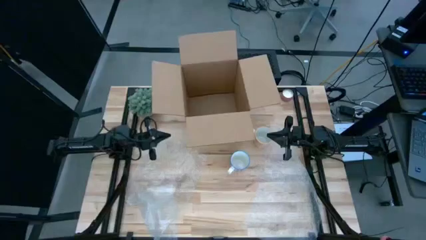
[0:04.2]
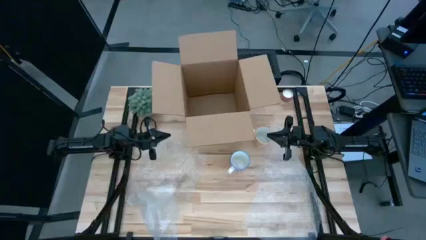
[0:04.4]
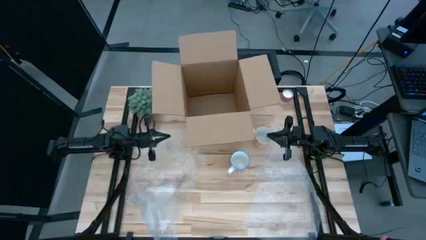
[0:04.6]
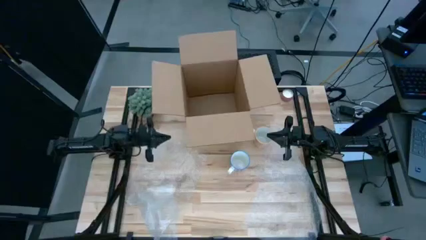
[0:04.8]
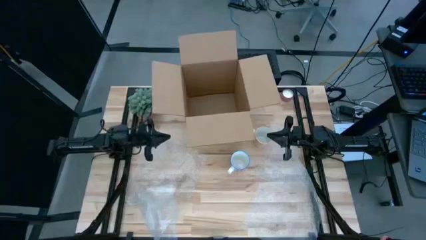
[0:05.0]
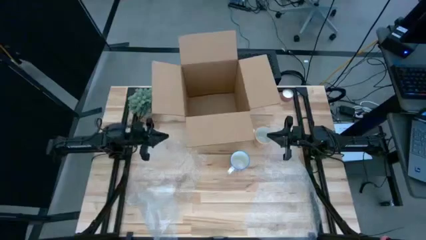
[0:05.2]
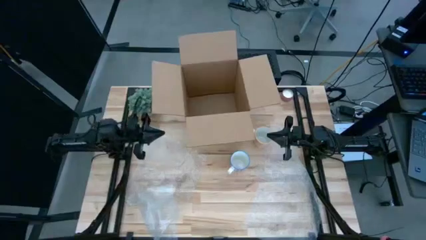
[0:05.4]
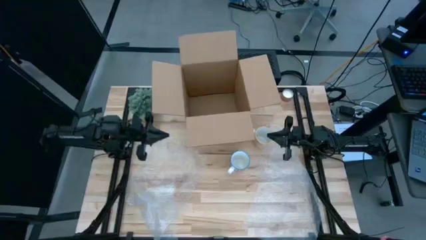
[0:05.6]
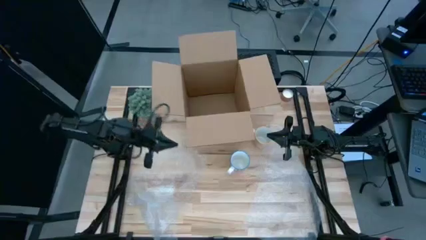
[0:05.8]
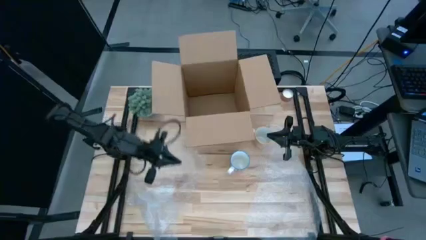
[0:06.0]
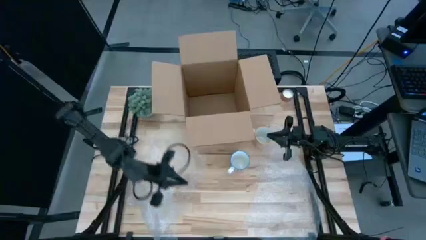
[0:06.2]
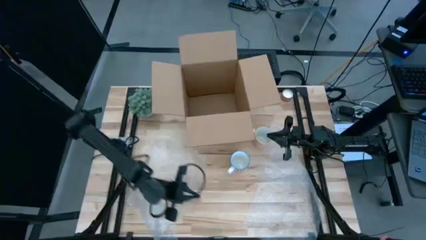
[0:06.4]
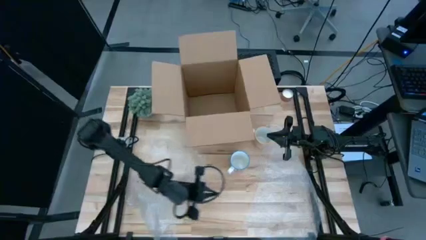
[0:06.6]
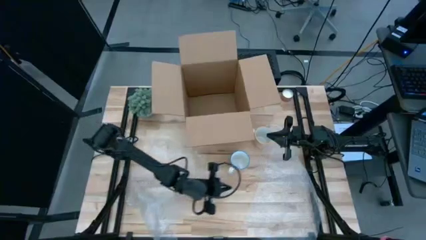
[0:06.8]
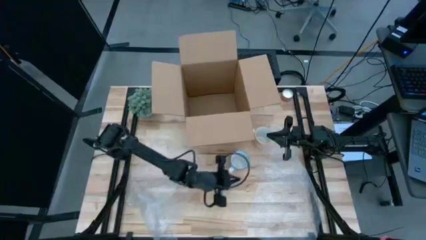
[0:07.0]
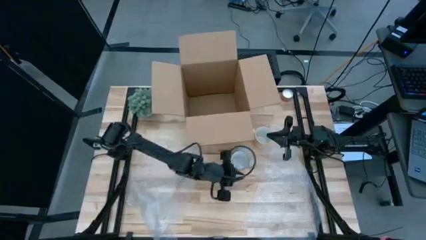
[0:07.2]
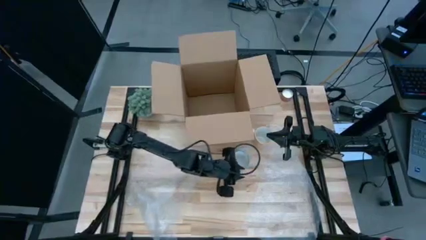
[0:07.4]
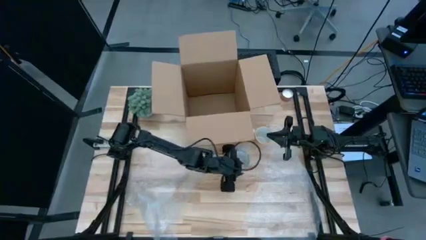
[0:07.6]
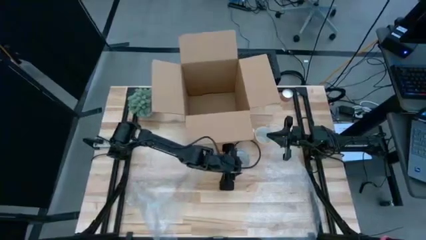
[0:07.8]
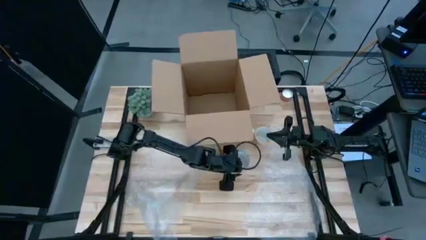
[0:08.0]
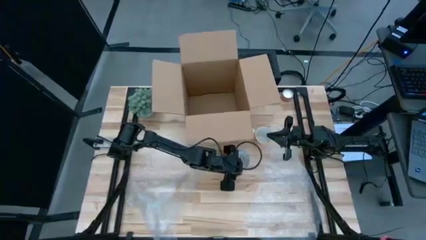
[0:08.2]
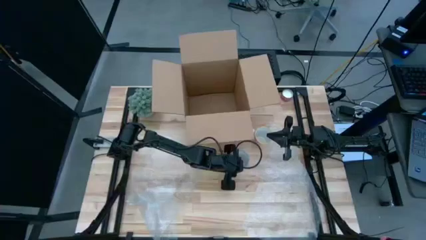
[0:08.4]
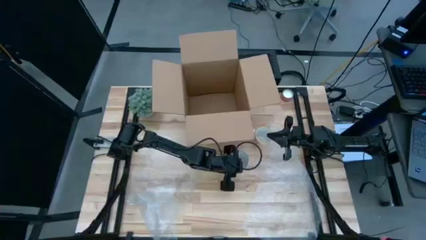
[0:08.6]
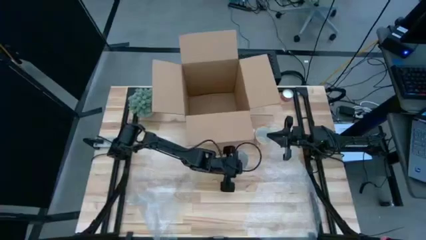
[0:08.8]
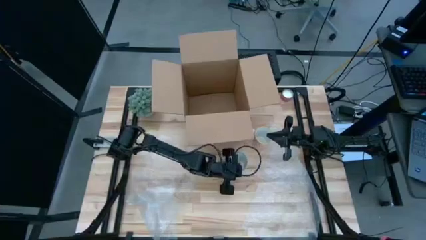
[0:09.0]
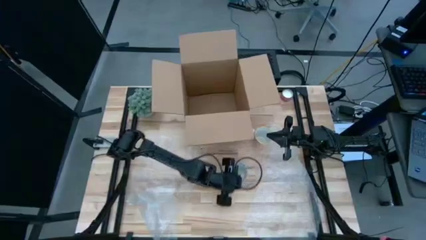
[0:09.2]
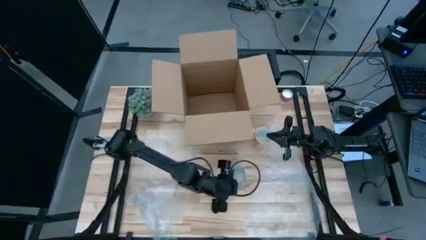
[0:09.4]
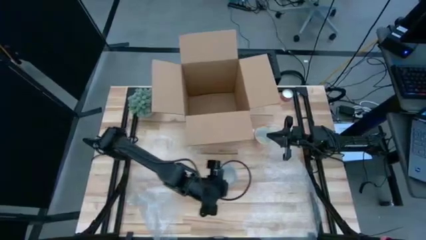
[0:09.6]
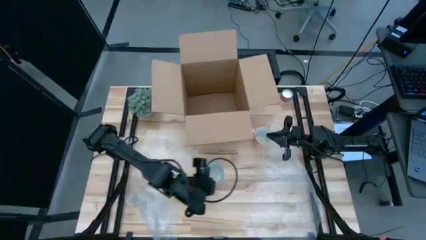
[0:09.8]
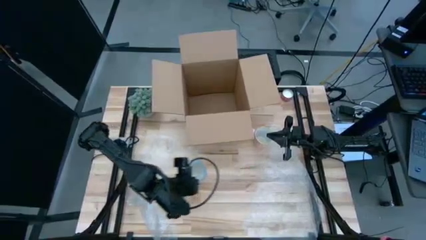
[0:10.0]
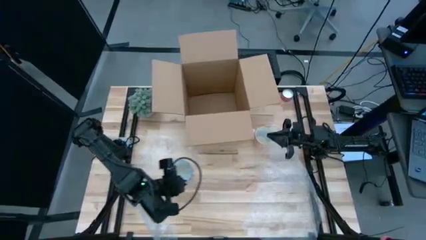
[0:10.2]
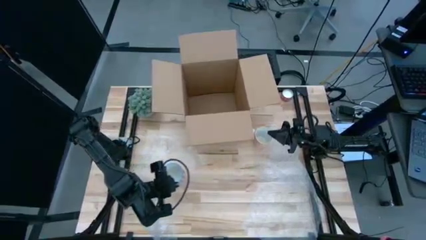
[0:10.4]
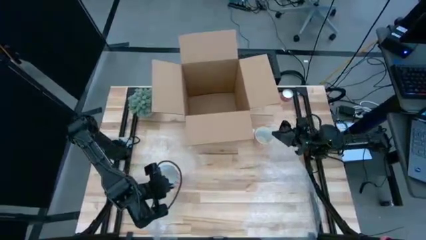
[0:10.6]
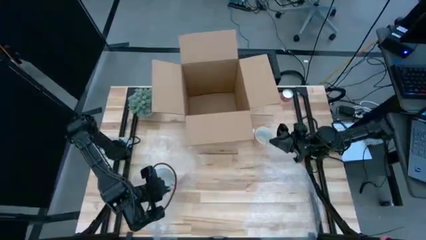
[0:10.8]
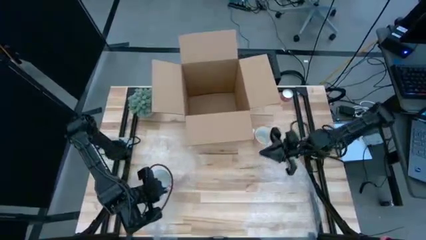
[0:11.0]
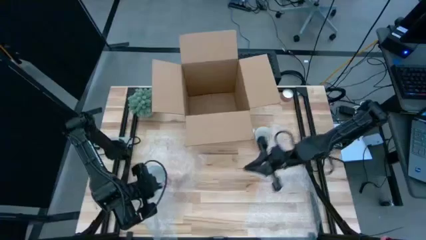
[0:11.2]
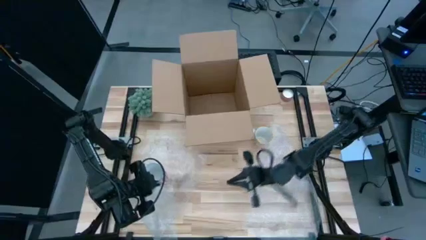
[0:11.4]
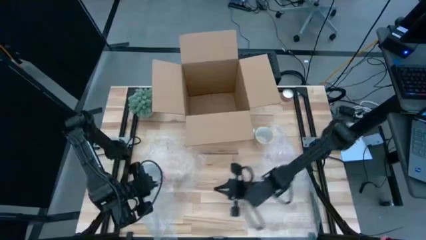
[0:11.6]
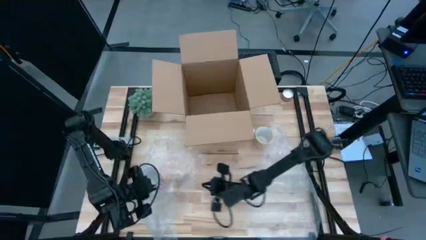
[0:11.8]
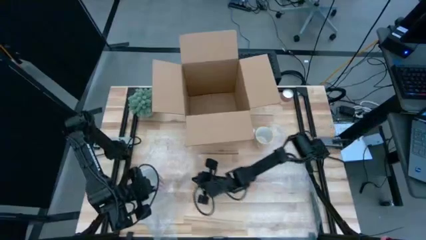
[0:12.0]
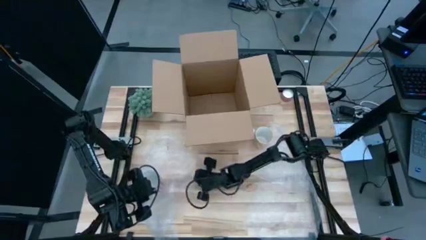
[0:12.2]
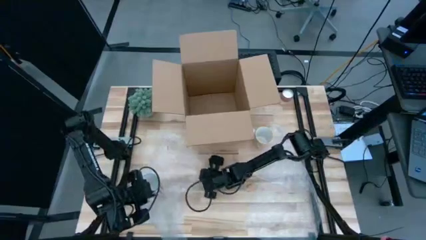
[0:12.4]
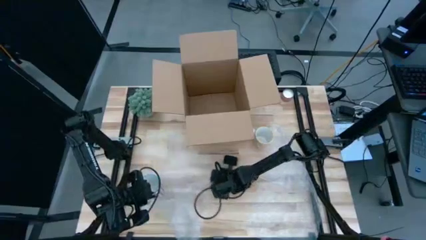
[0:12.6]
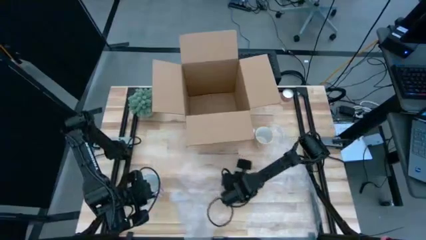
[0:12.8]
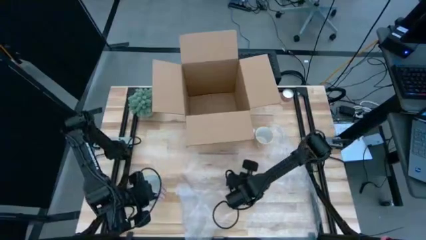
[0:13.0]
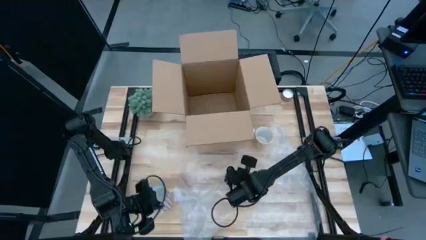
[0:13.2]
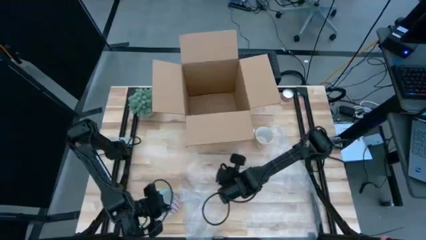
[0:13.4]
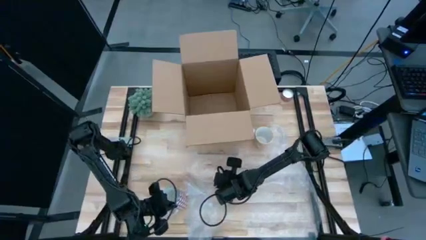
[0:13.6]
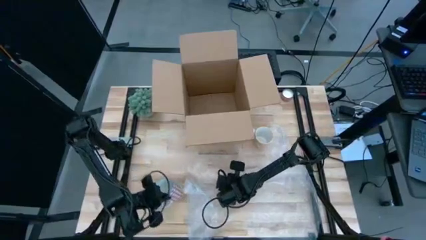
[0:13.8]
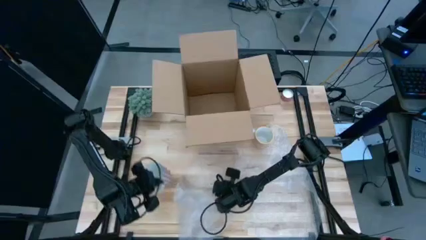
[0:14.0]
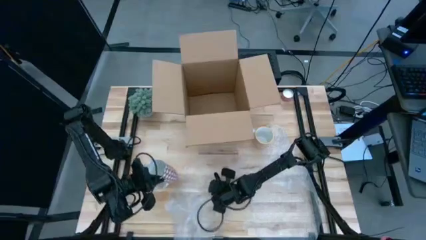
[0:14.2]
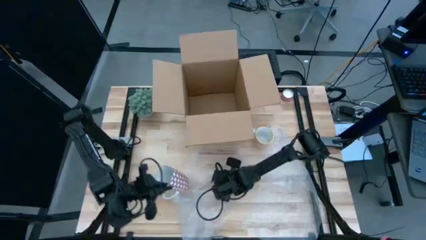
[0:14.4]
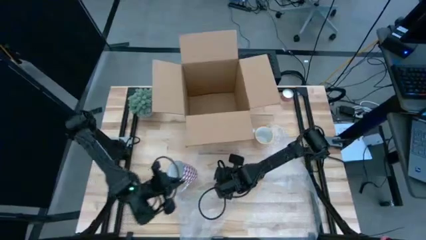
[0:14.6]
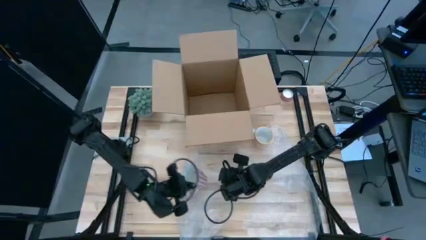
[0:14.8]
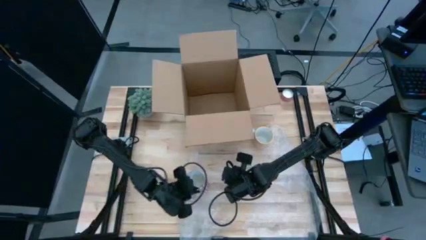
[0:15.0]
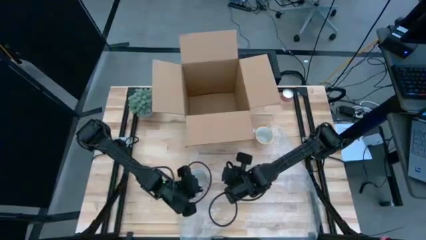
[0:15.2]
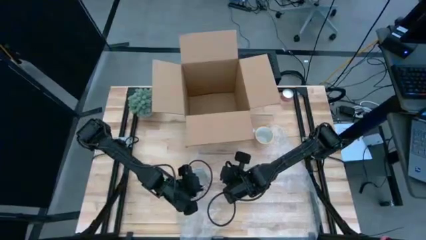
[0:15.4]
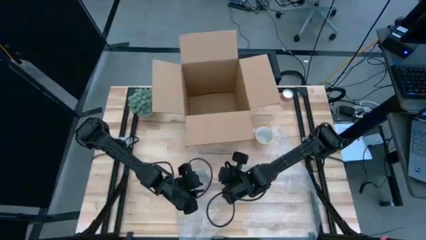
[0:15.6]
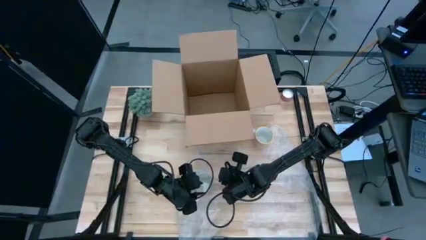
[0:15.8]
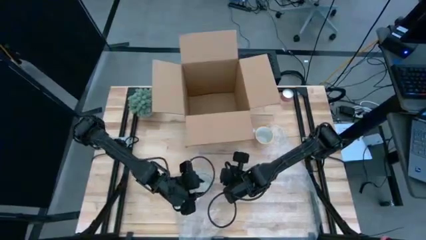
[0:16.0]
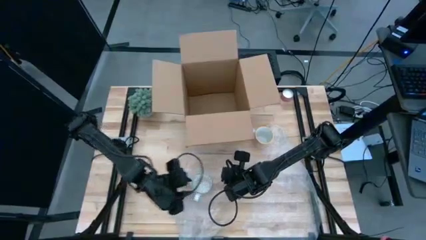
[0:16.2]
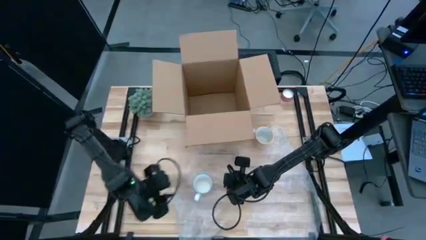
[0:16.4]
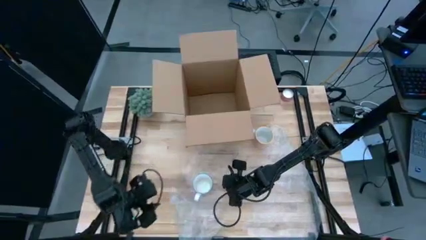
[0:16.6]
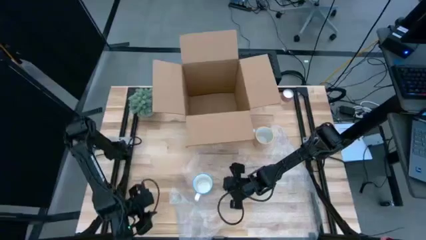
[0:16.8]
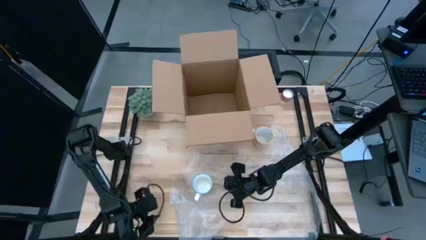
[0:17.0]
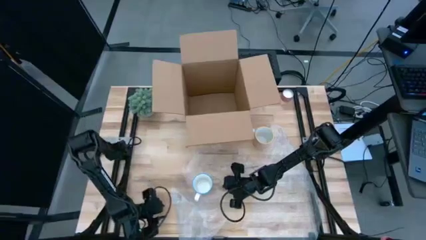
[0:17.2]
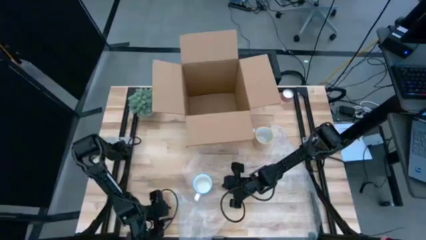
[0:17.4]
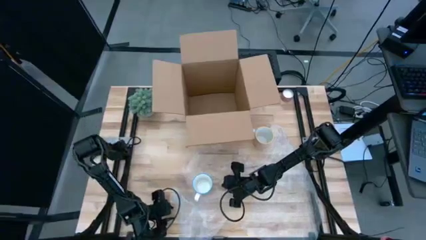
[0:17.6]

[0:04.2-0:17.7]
Task: wrap mug
Wrap the red cup in the bubble wrap
